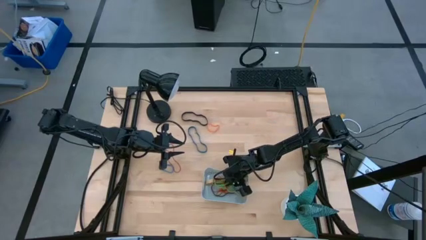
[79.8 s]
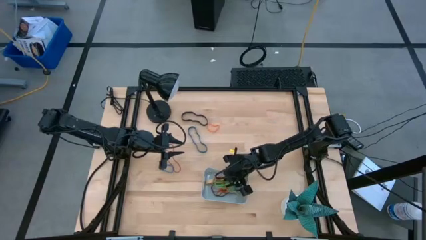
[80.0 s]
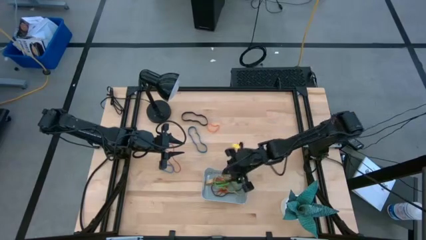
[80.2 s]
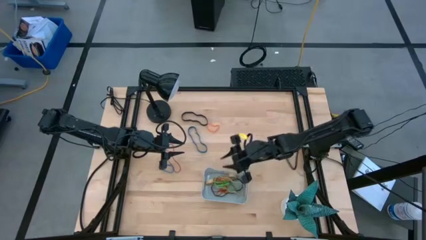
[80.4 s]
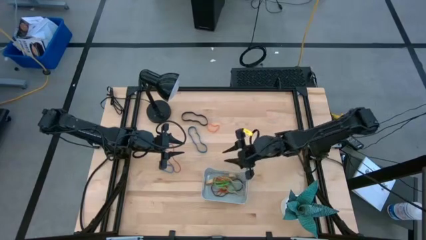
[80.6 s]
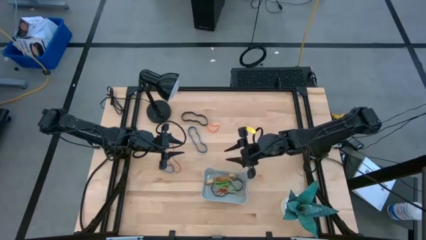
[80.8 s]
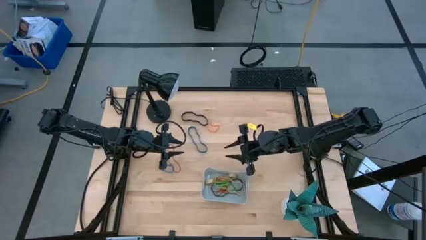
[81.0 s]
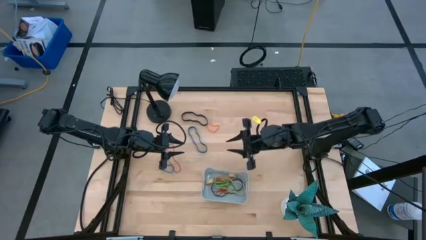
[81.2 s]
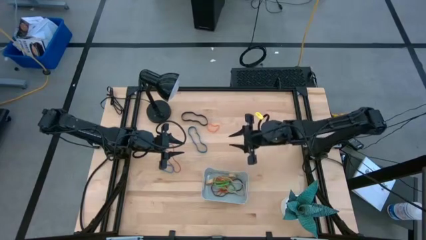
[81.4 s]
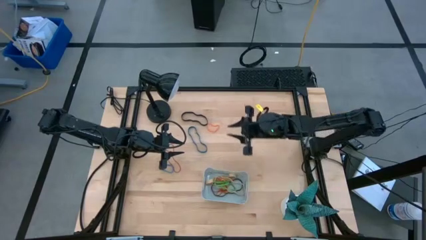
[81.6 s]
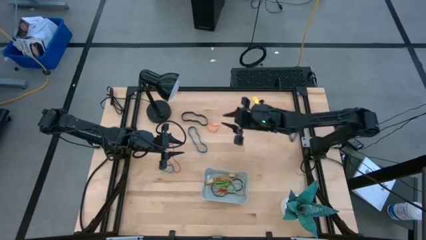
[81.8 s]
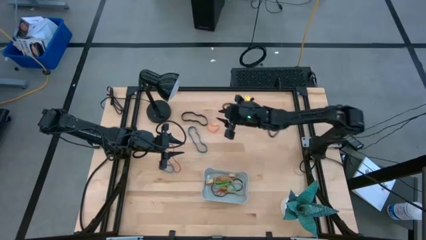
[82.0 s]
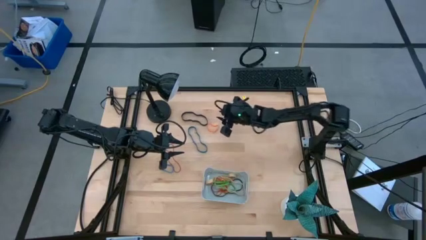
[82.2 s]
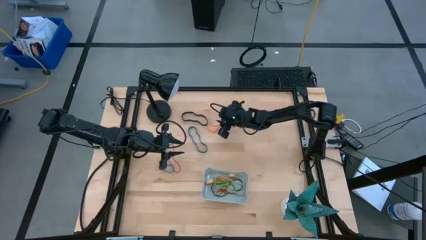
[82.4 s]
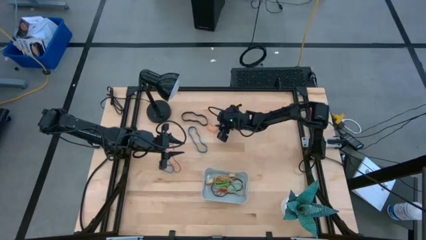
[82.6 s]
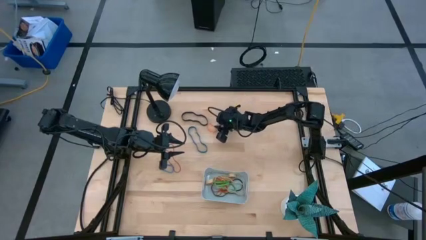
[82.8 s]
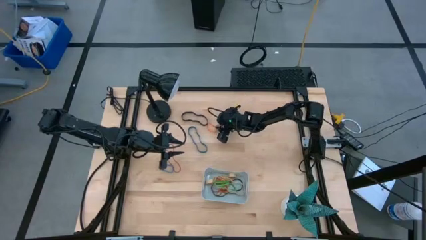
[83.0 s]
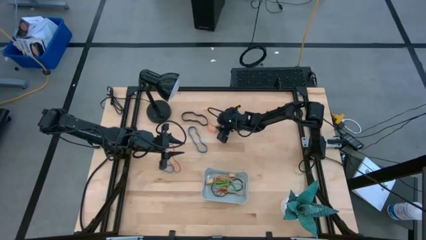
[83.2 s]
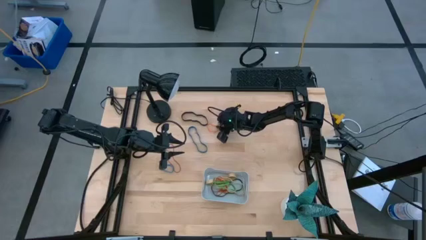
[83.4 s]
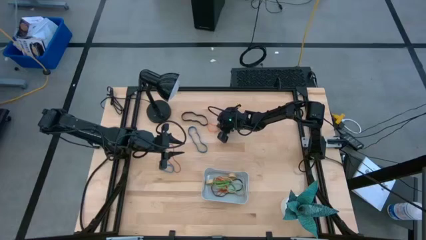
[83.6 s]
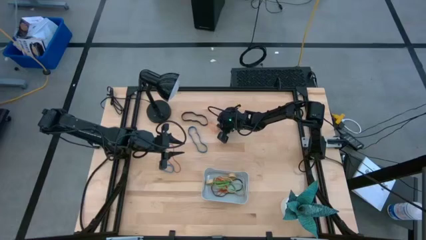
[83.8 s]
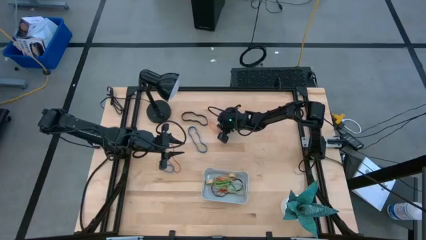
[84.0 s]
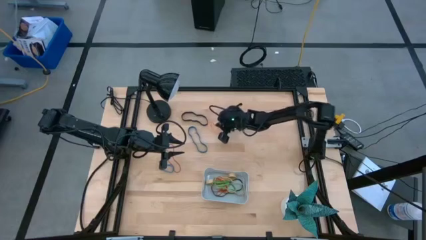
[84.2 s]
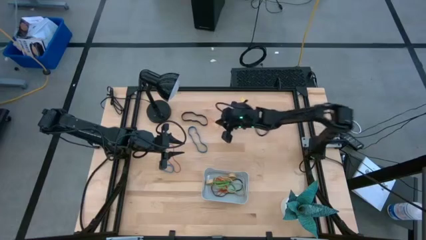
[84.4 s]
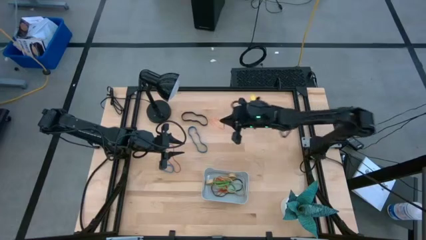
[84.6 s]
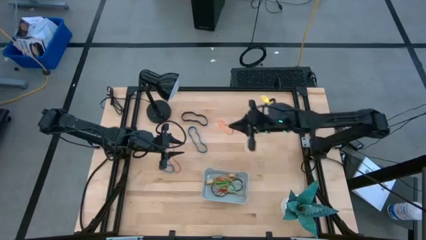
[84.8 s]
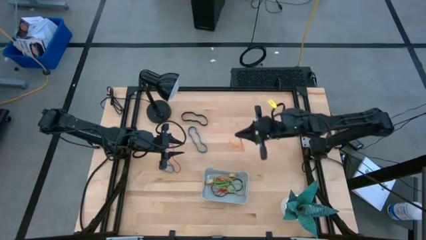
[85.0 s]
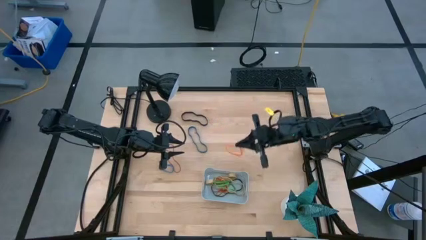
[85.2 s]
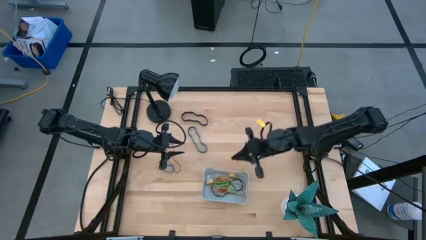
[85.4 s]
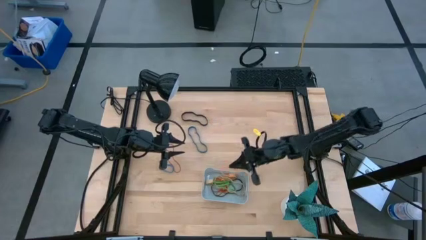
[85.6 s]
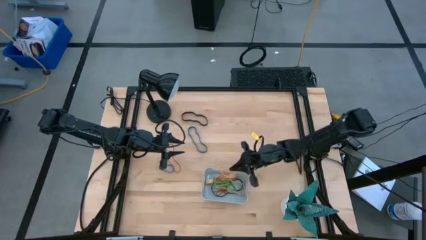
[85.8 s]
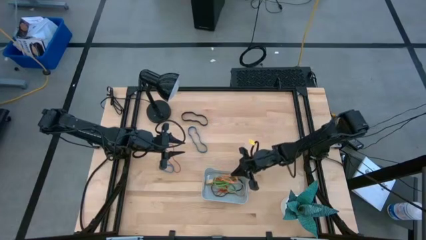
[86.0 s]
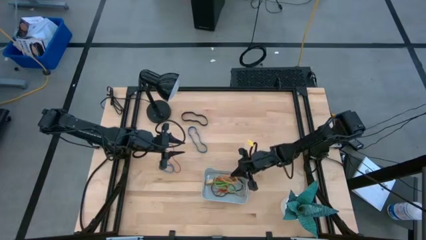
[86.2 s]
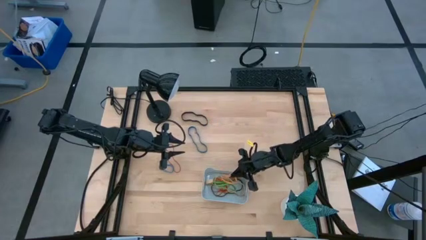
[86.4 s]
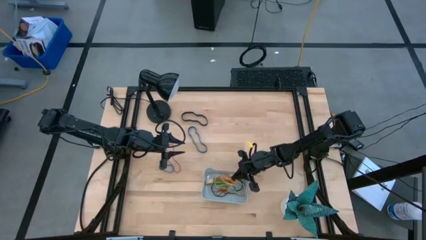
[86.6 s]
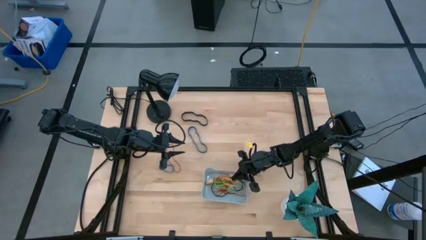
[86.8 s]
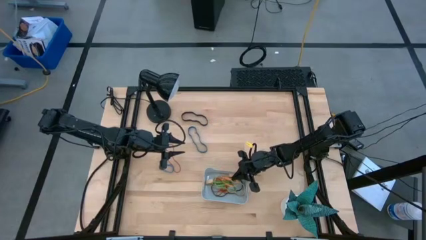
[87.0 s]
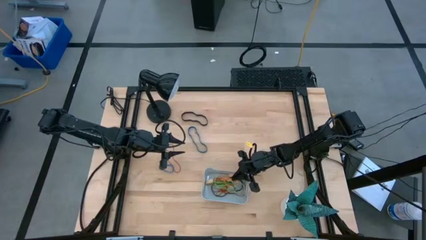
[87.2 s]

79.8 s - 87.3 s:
Task: Pick and place rubber bands into bin
Put the orange rubber band into the gray bin

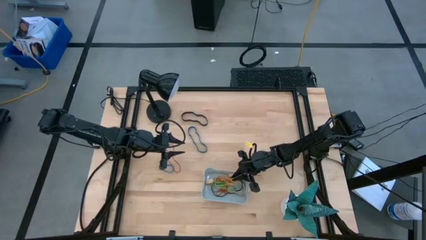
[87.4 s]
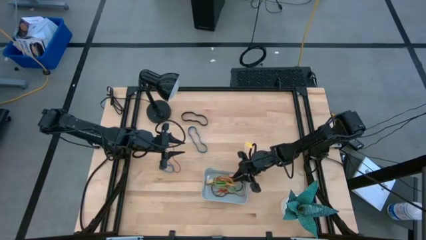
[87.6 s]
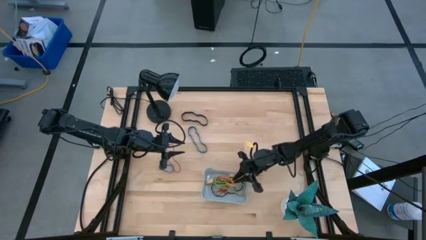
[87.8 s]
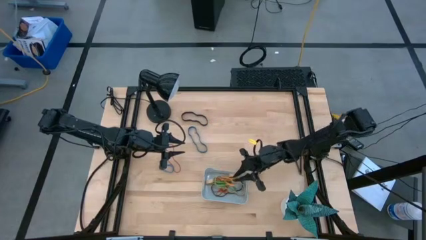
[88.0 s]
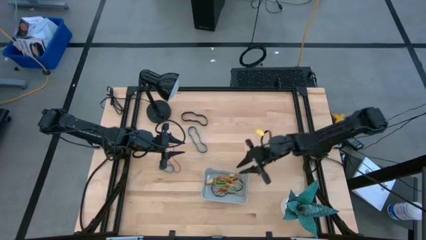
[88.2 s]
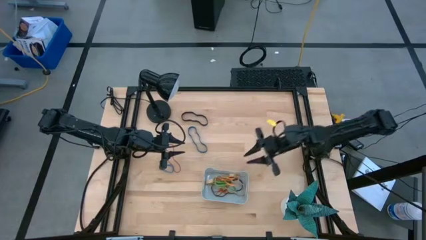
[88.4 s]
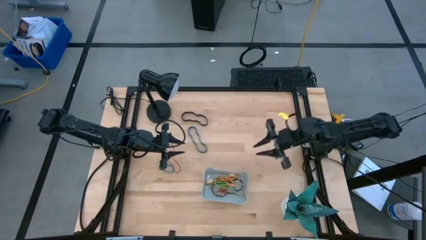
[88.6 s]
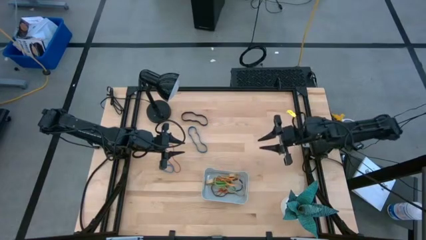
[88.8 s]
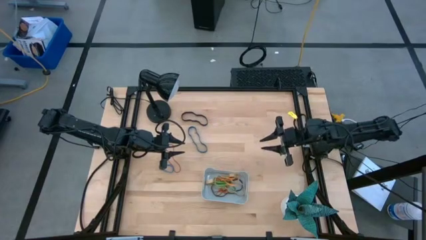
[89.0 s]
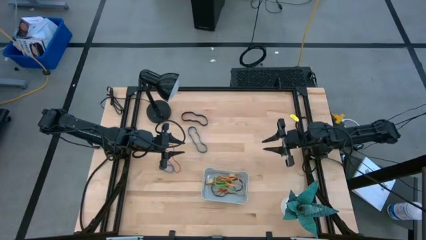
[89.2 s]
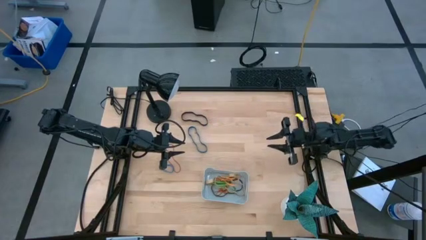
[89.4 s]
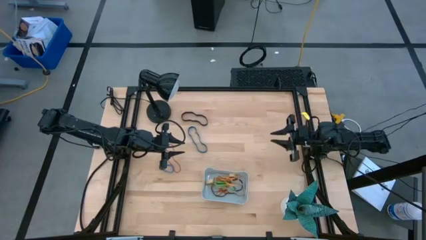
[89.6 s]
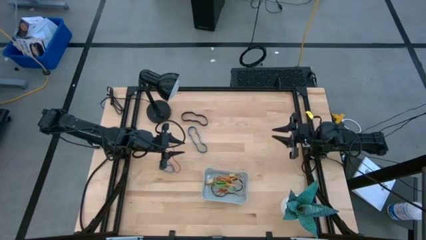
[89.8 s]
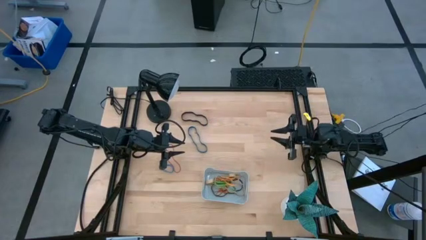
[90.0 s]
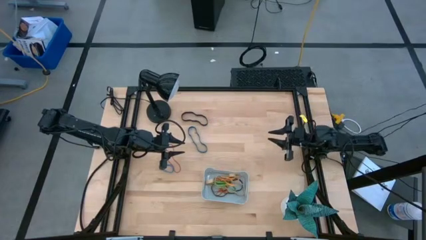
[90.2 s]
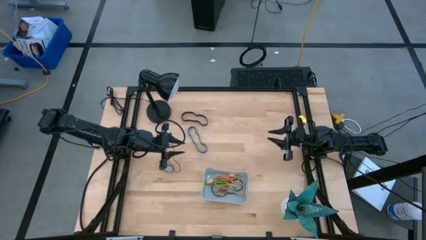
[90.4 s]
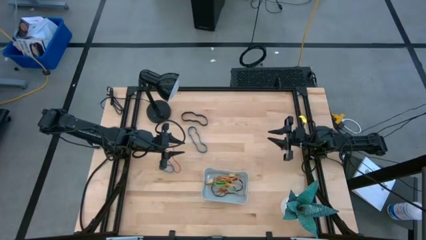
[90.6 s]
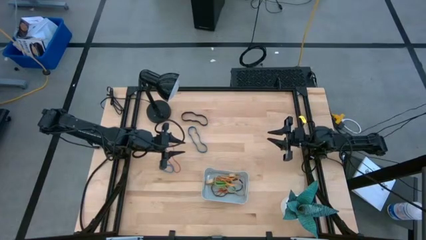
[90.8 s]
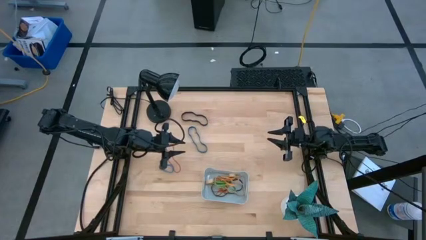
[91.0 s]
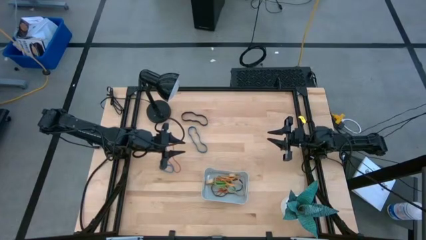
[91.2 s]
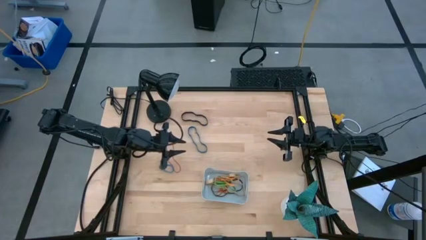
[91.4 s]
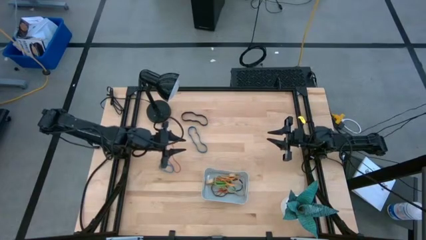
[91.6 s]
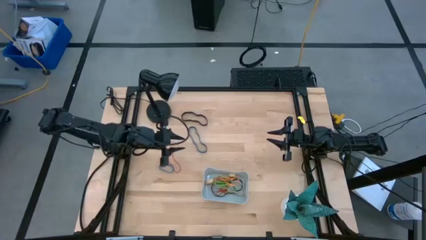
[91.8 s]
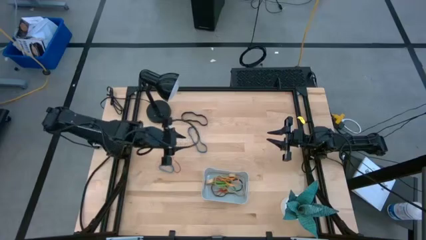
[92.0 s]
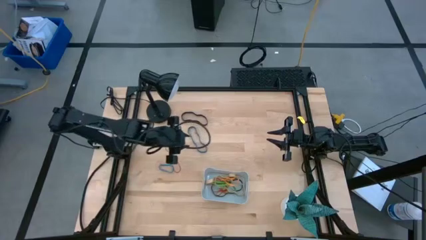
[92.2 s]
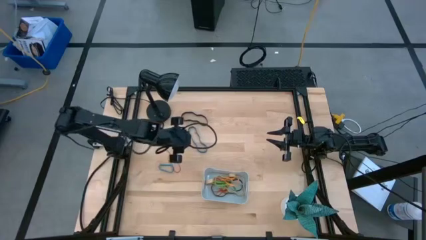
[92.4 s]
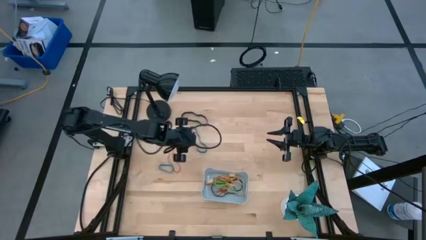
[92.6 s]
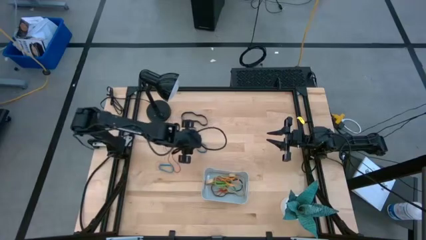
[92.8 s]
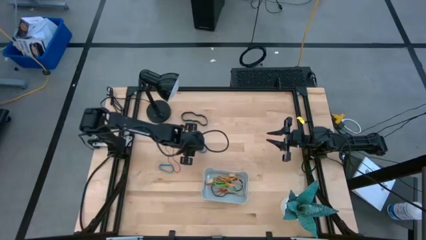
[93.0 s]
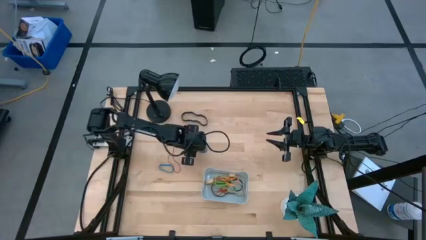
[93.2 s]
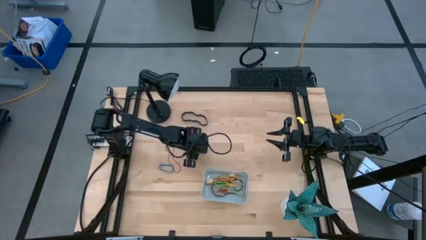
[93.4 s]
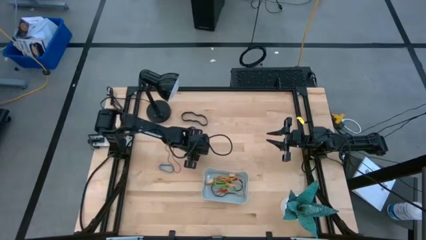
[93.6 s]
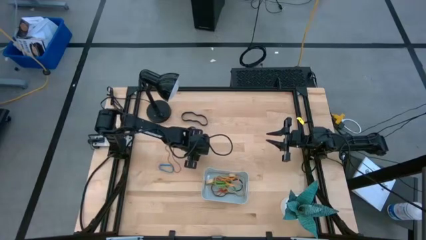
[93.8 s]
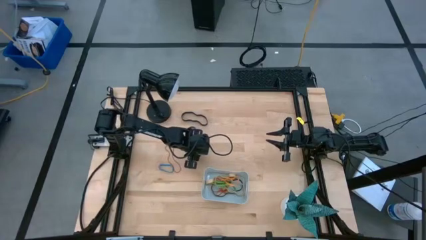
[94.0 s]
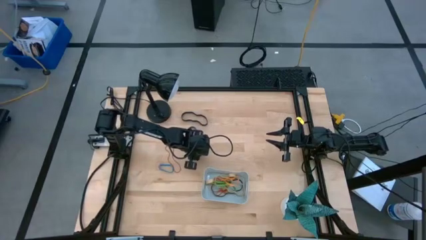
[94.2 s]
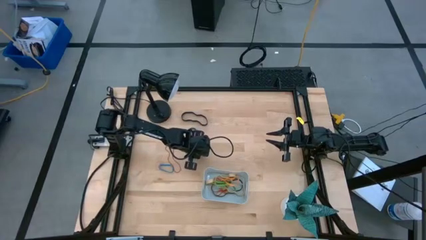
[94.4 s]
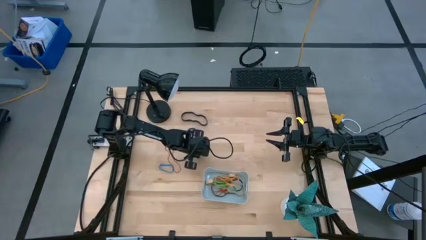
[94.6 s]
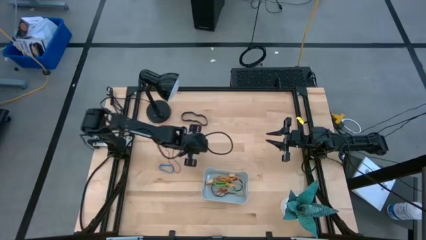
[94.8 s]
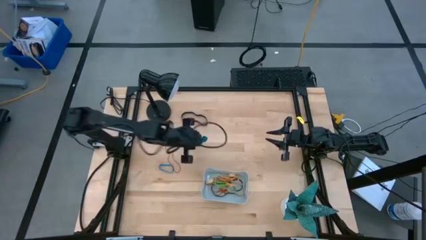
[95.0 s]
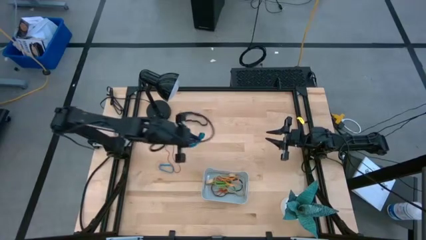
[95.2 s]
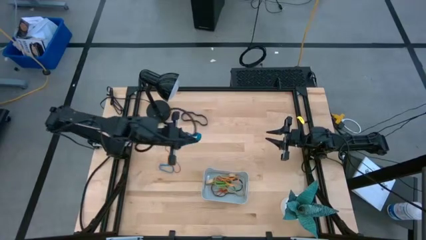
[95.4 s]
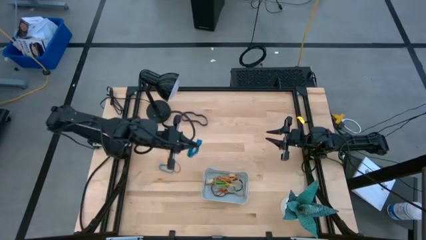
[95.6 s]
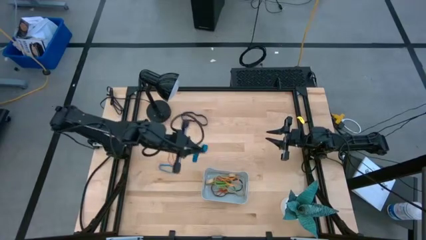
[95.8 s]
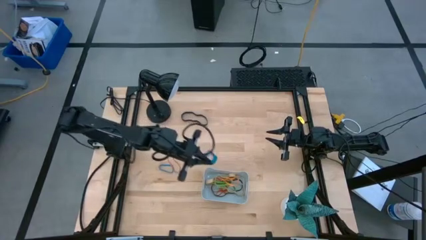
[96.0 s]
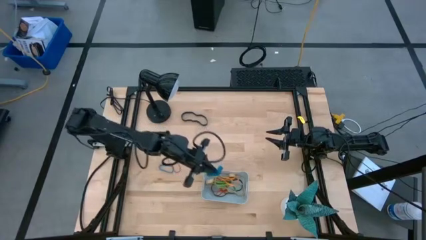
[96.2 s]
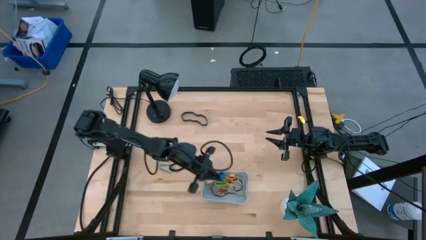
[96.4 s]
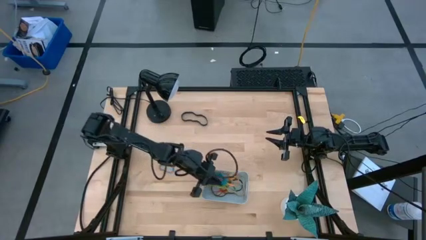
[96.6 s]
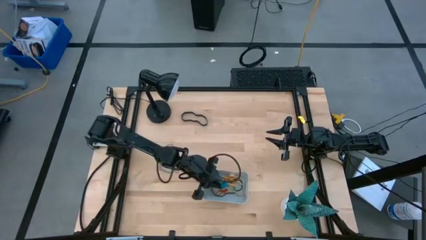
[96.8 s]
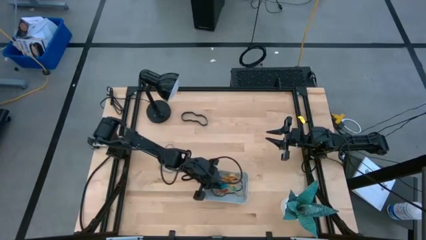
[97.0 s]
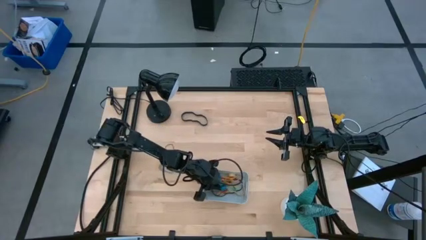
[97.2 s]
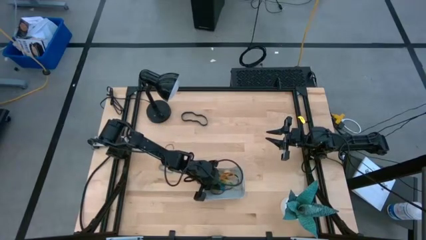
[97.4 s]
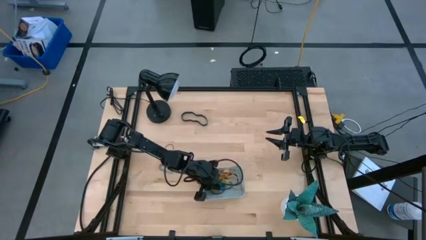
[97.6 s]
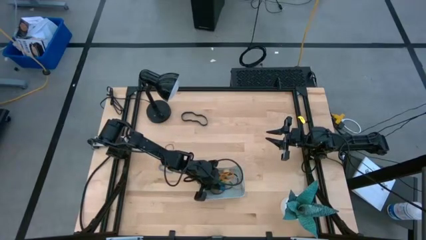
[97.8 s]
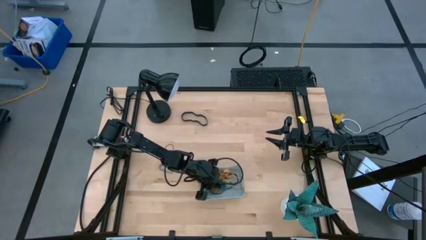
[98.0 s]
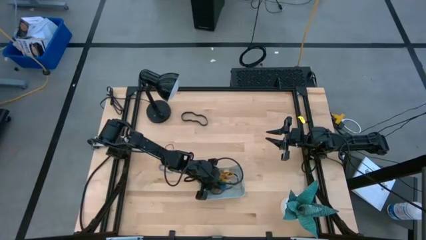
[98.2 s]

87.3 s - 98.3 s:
Put the top blue rubber band into the gray bin
